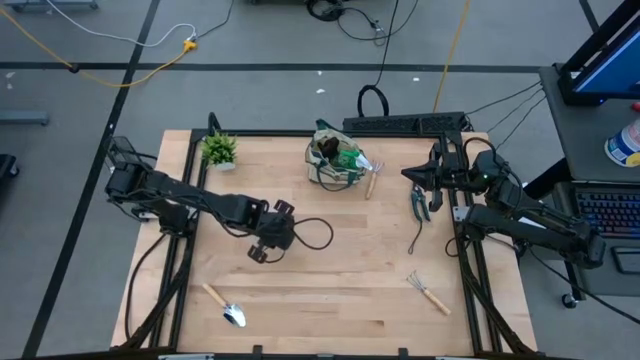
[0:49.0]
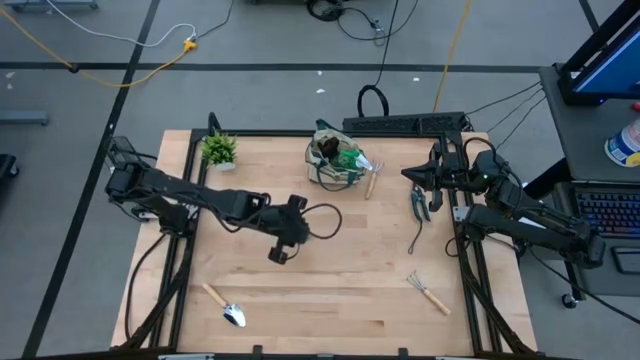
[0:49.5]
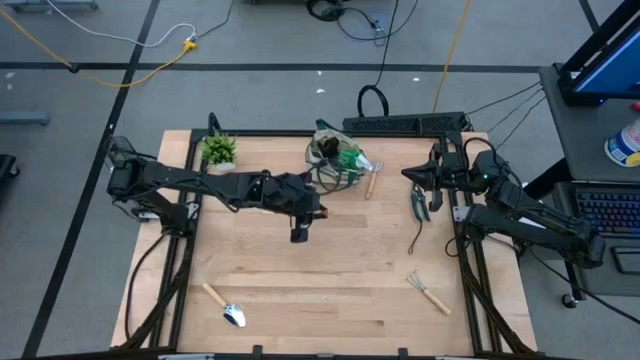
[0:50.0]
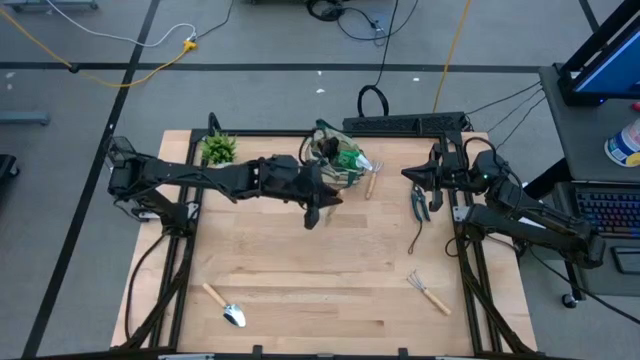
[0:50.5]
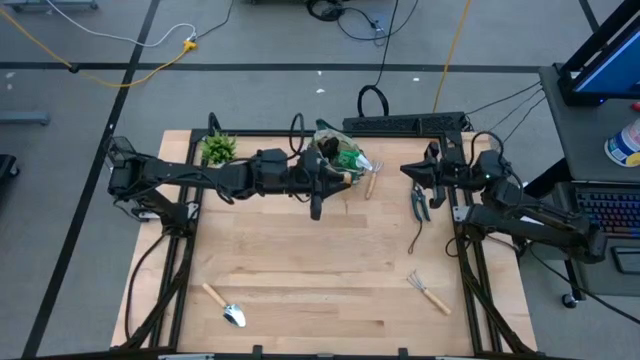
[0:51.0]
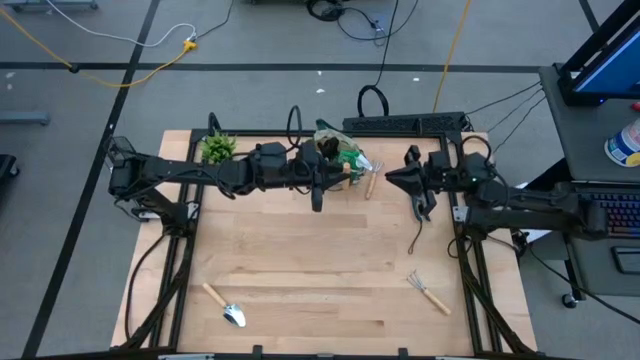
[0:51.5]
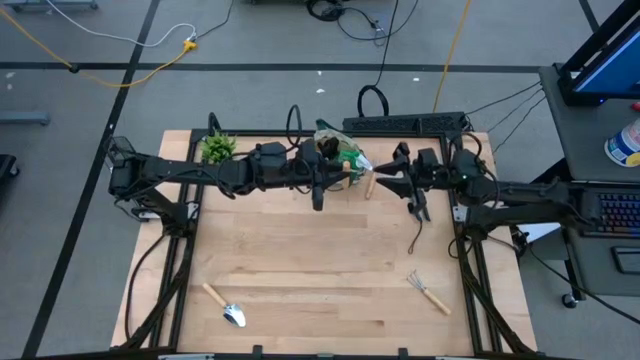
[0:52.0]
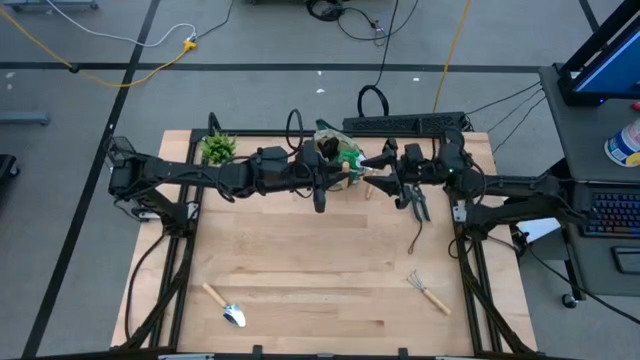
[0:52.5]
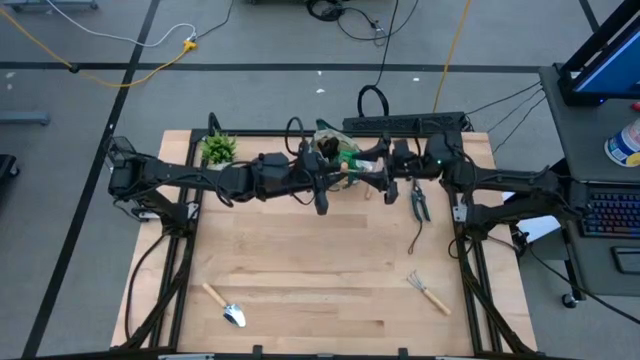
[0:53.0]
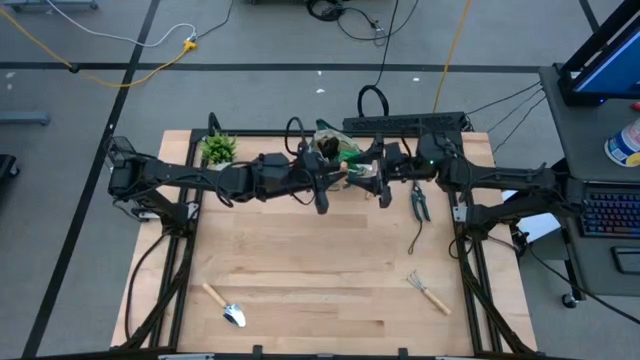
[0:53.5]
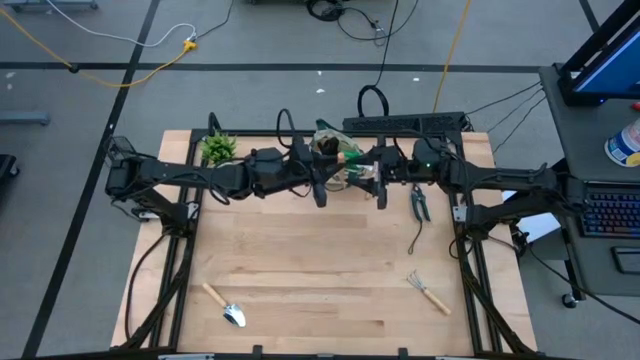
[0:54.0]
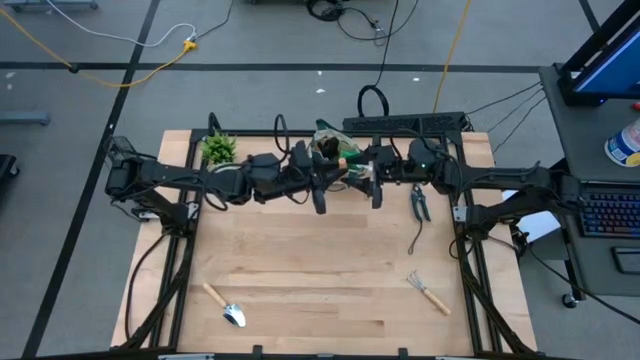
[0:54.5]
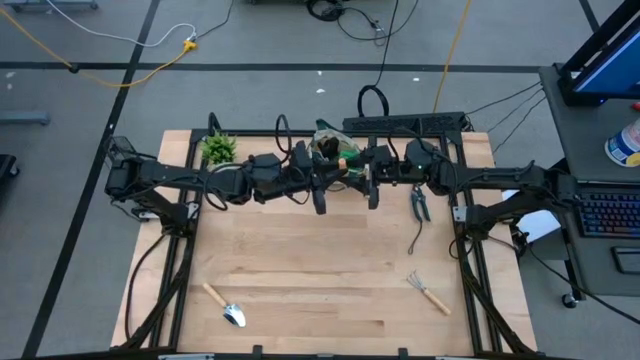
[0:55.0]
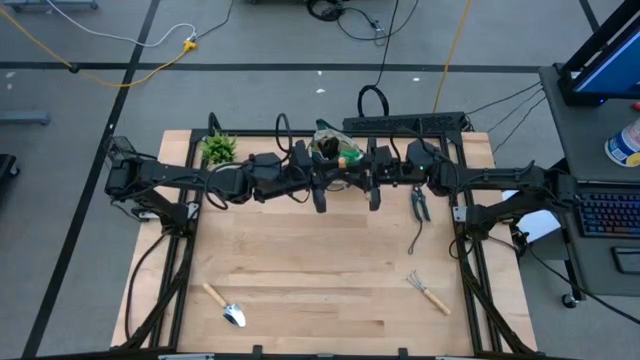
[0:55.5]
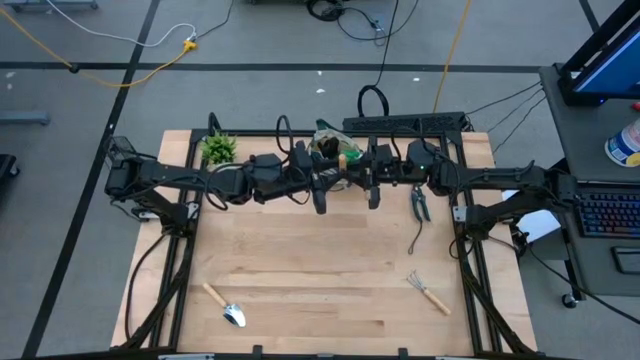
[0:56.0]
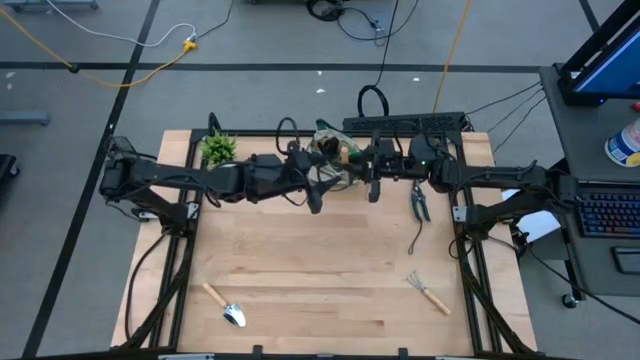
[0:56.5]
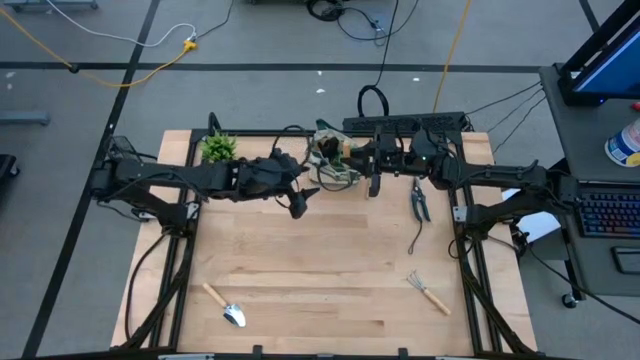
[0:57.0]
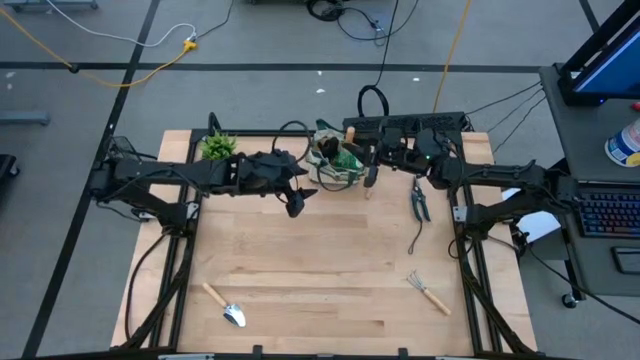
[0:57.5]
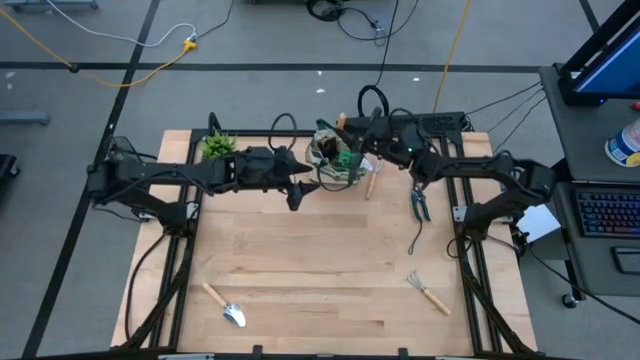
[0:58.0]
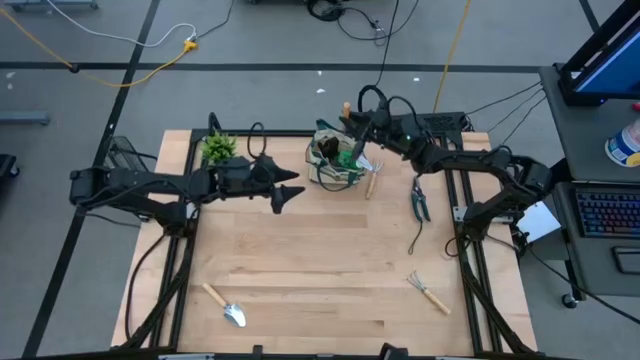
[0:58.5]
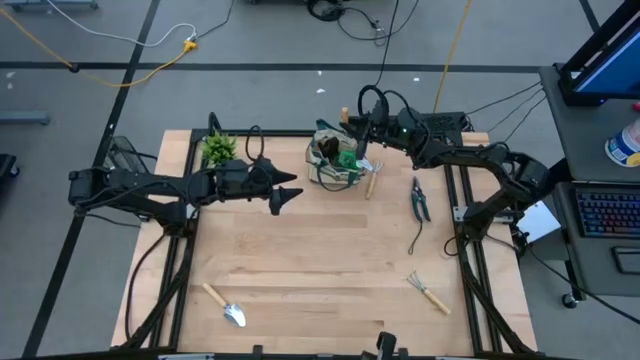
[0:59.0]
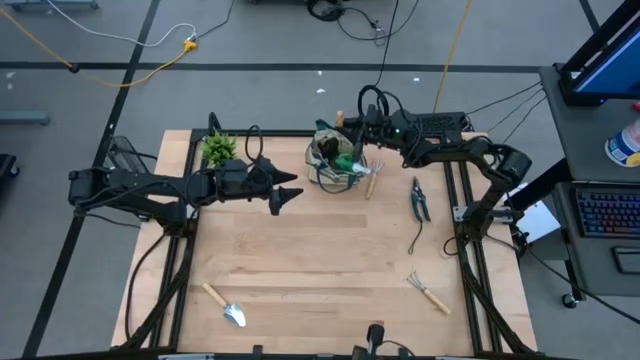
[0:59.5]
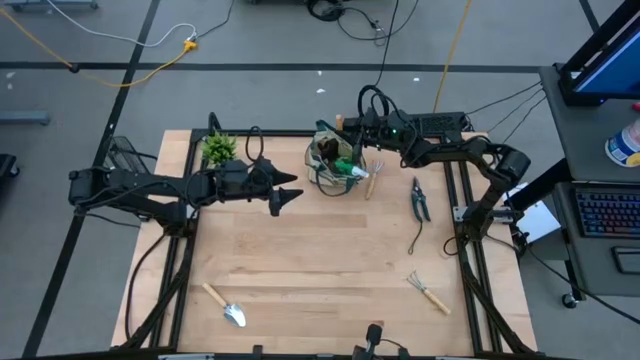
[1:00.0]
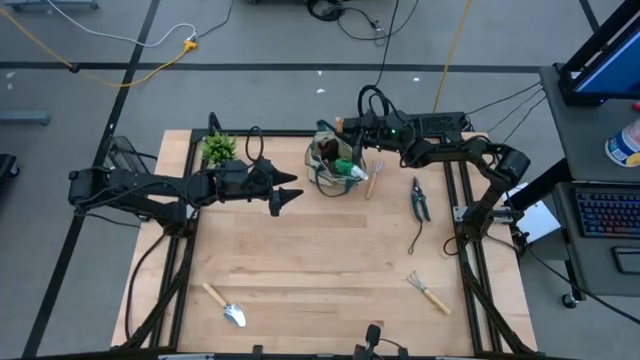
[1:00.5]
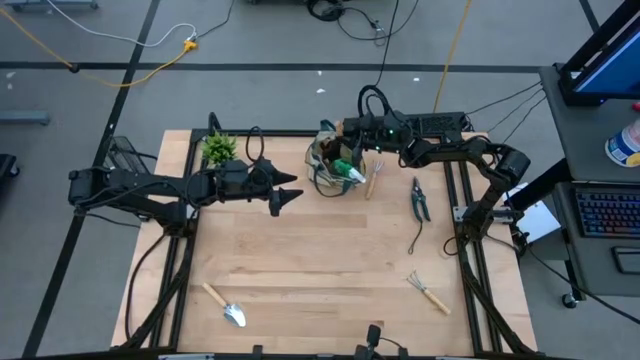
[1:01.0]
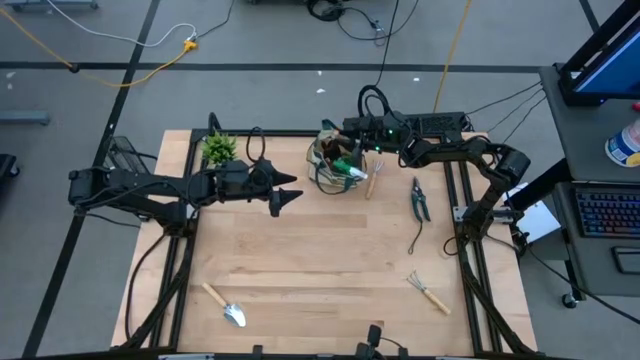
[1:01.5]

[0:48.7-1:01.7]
Task: Pick & Place Garden tools in Gardening bag
Put the top brown trowel into the gardening bag

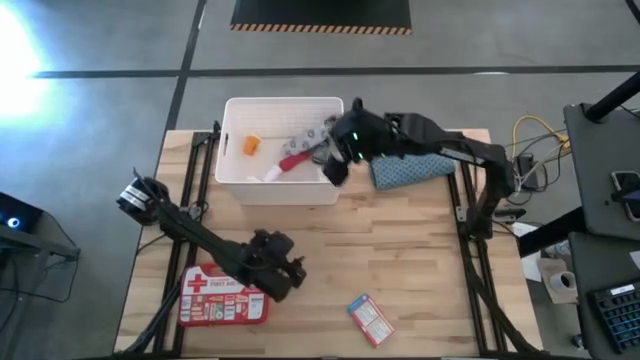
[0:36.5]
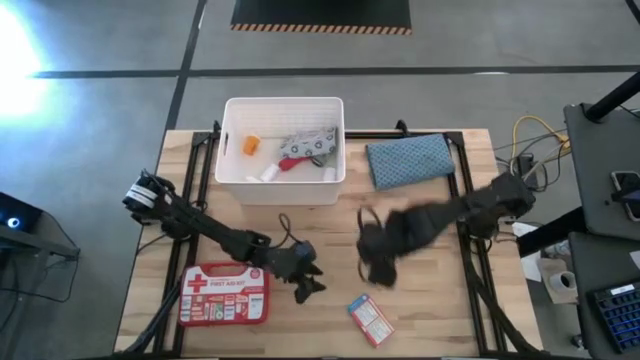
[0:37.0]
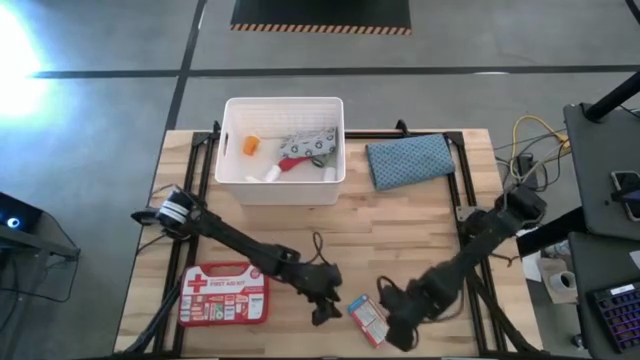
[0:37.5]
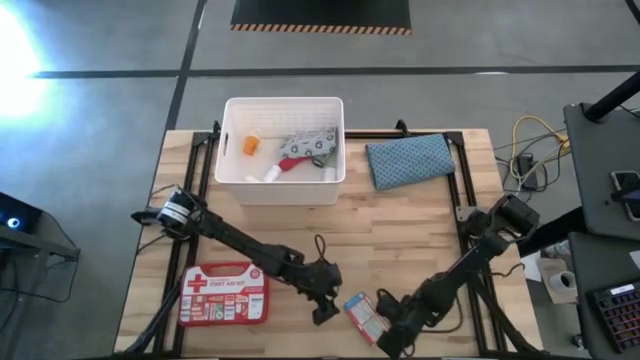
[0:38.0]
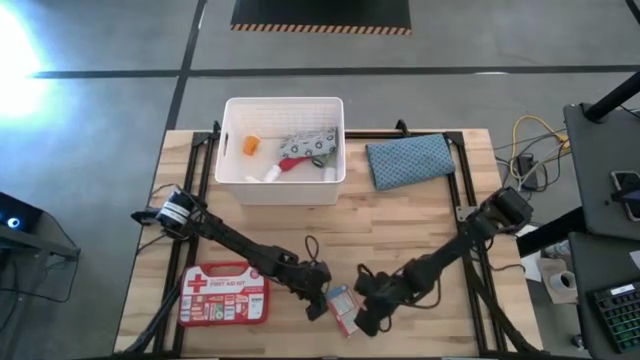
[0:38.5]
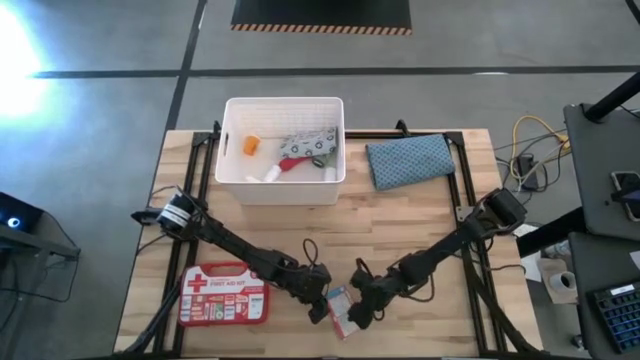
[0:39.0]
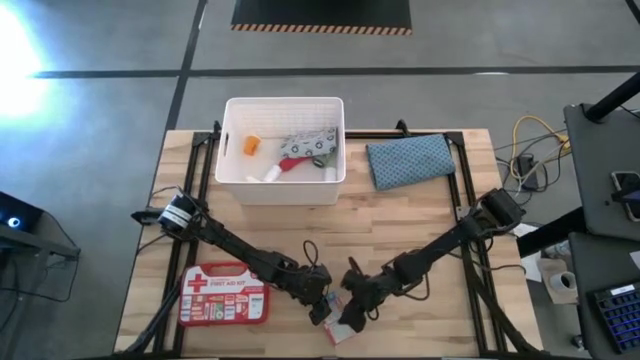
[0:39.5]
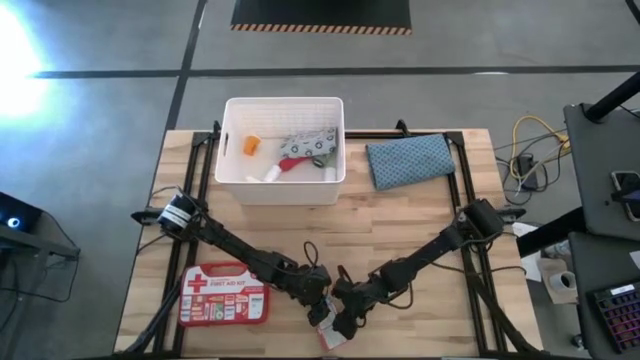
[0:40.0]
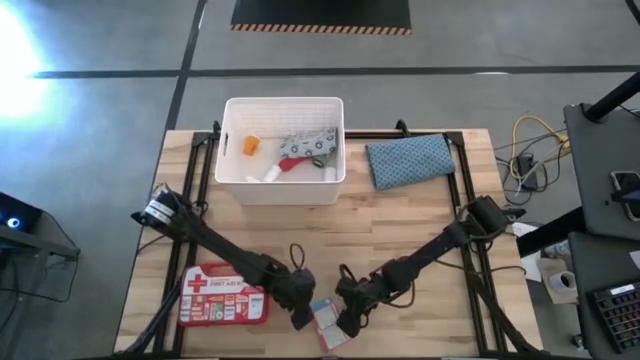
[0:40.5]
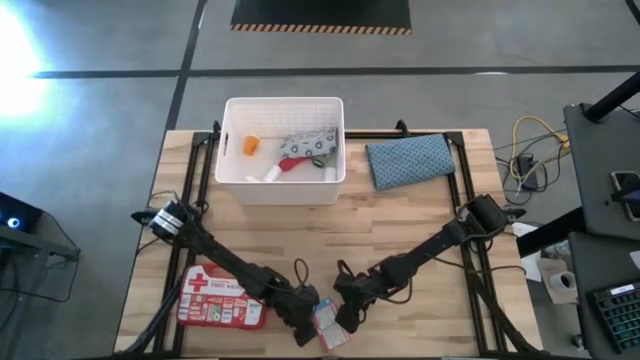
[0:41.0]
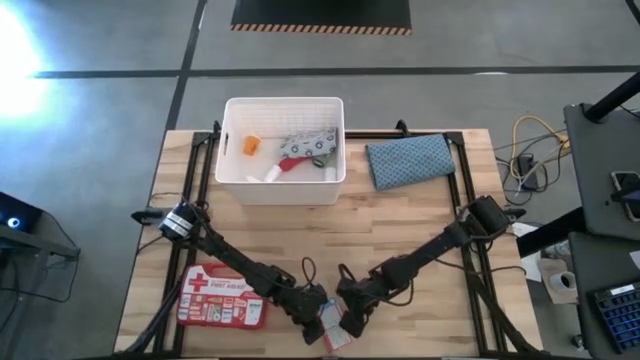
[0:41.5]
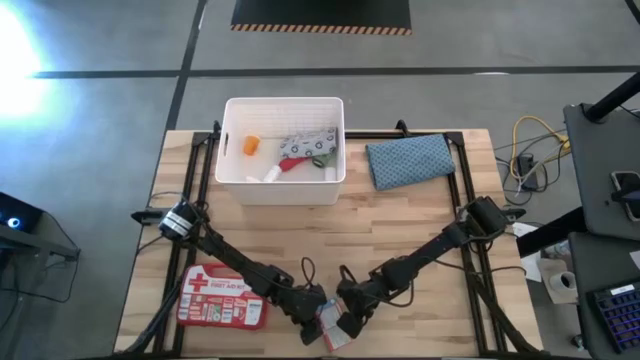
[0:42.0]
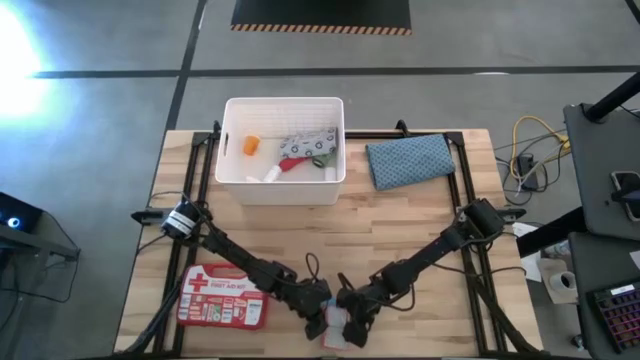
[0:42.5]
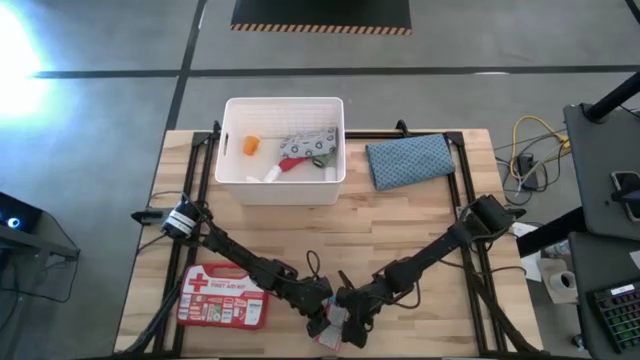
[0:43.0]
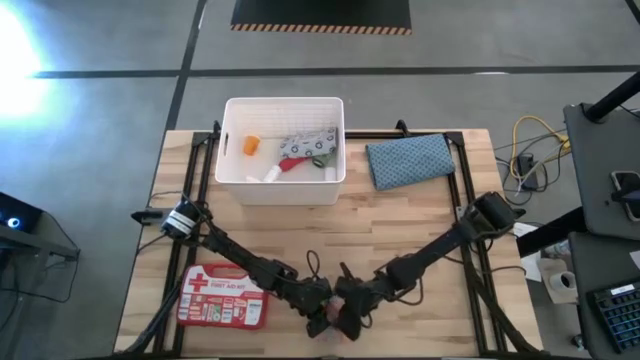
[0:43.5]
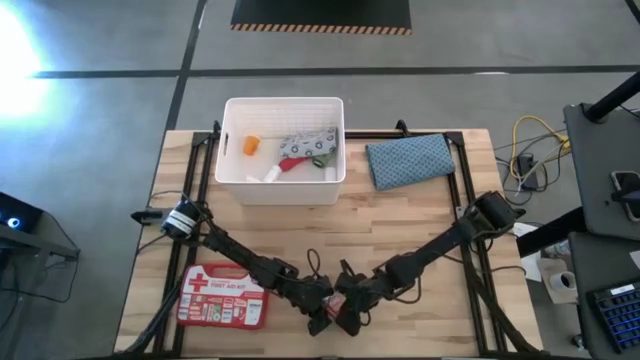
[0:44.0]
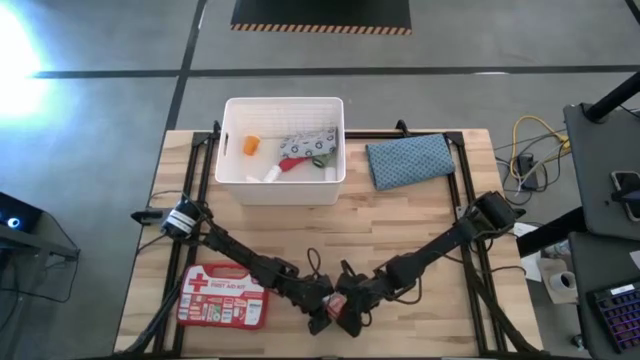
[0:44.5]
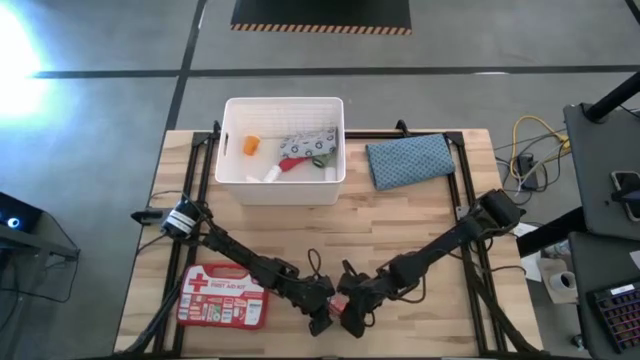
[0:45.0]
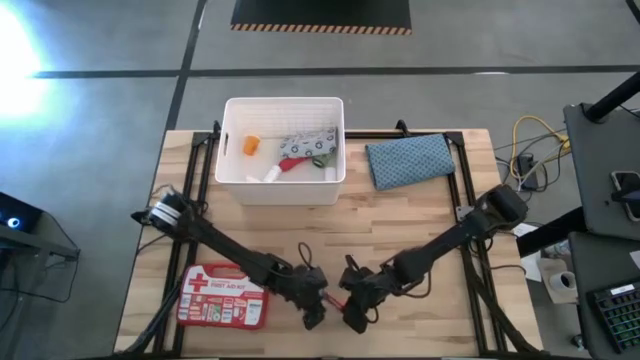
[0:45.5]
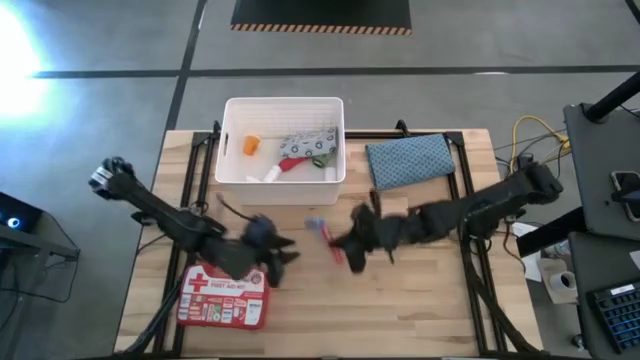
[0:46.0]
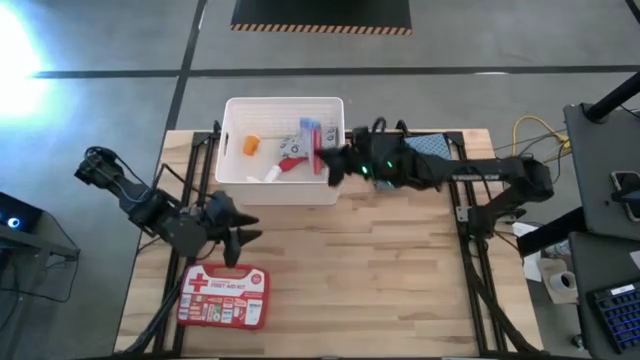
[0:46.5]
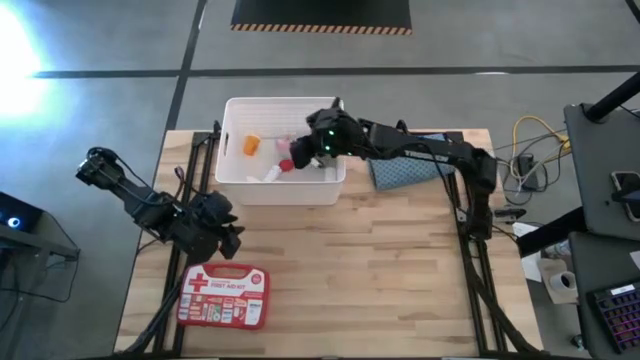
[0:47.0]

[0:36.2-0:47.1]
Task: Pick & place medical supplies in basket/bin
Put the red pill box into the white bin
